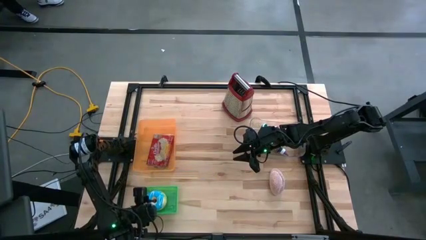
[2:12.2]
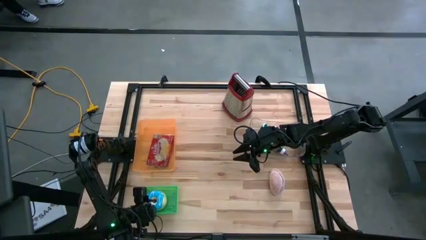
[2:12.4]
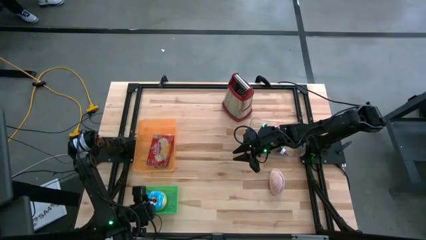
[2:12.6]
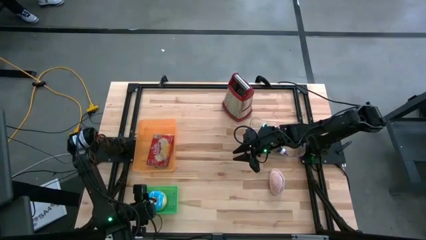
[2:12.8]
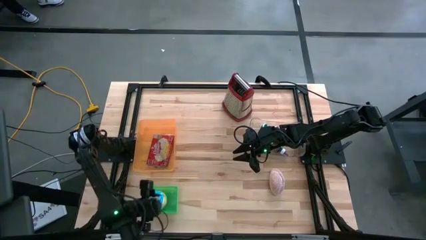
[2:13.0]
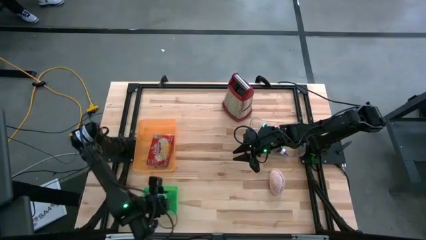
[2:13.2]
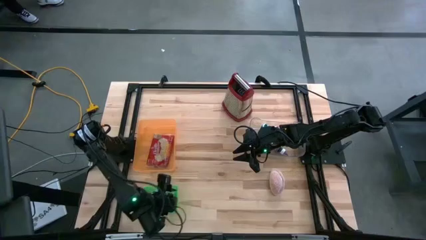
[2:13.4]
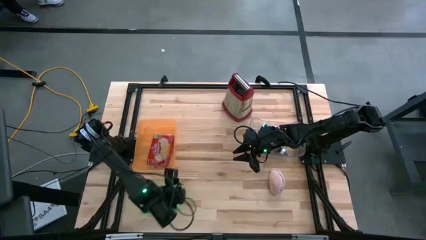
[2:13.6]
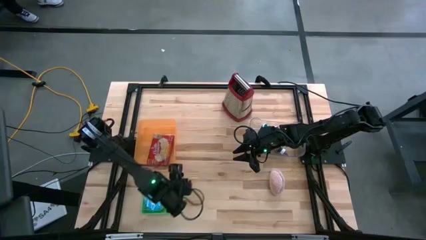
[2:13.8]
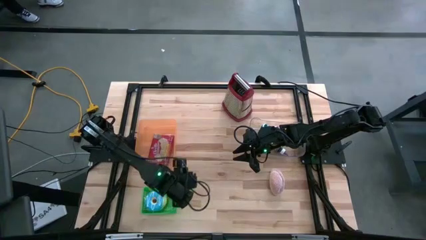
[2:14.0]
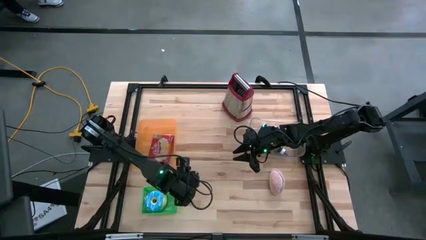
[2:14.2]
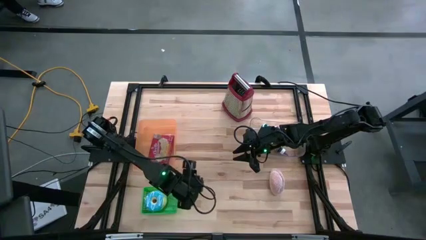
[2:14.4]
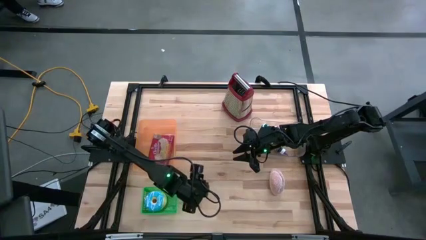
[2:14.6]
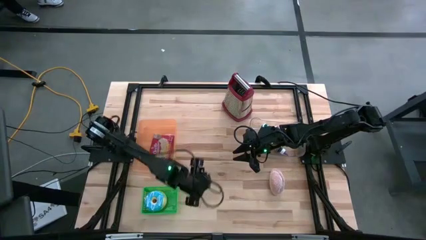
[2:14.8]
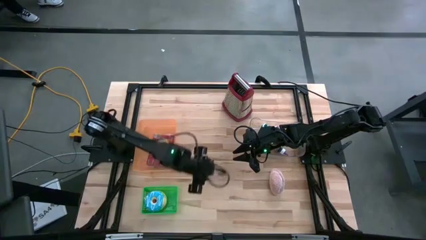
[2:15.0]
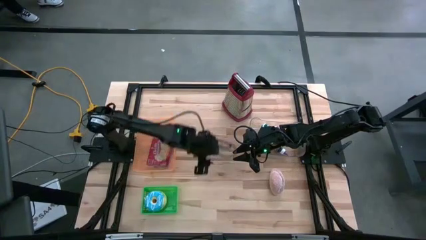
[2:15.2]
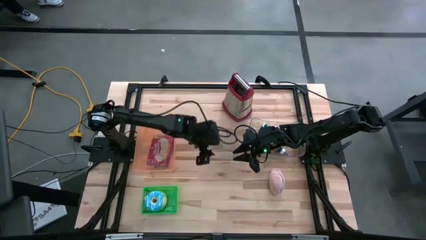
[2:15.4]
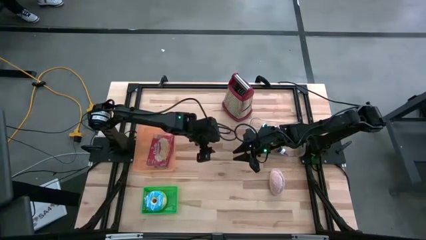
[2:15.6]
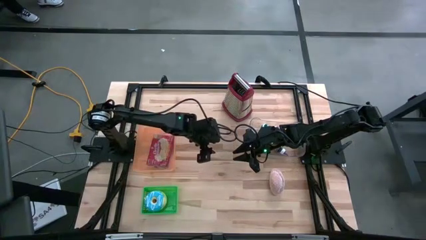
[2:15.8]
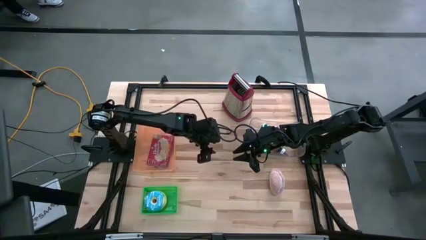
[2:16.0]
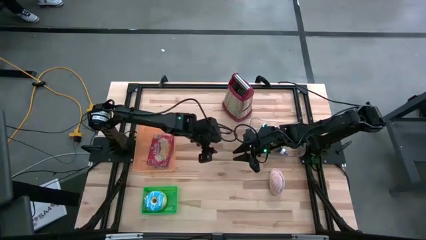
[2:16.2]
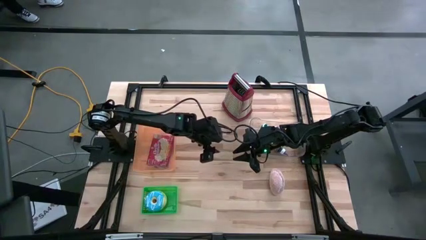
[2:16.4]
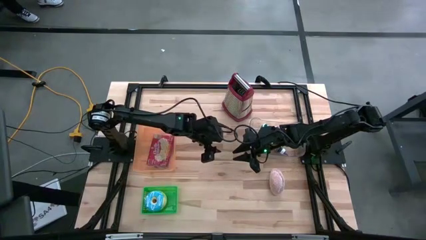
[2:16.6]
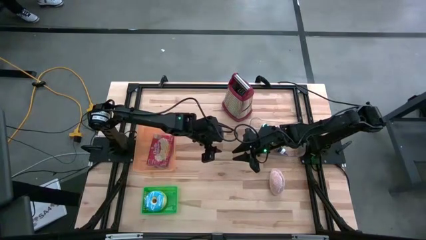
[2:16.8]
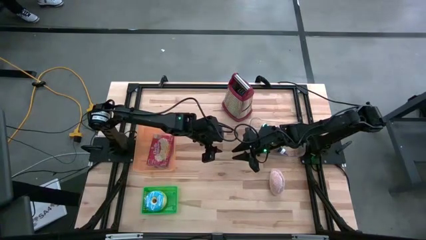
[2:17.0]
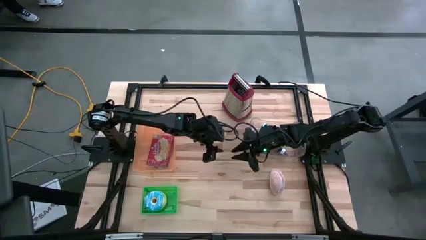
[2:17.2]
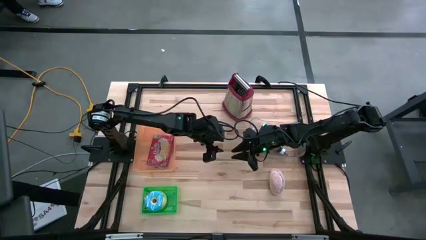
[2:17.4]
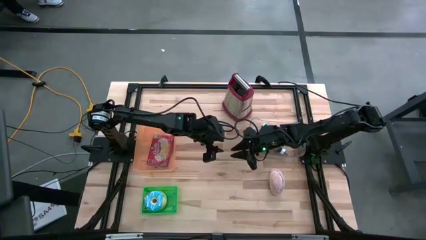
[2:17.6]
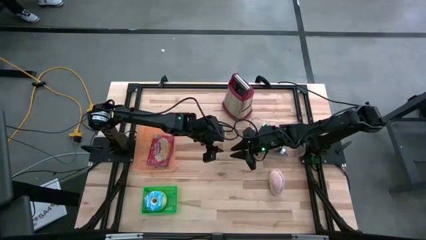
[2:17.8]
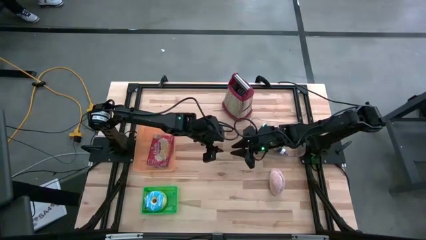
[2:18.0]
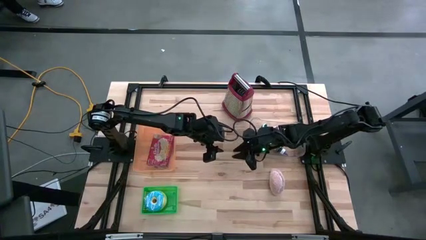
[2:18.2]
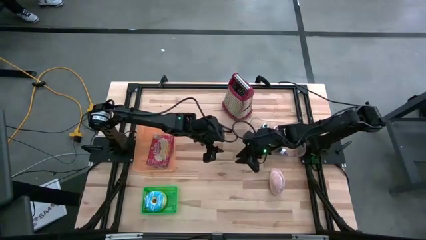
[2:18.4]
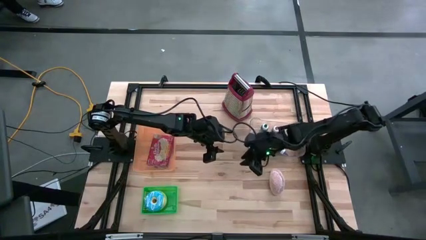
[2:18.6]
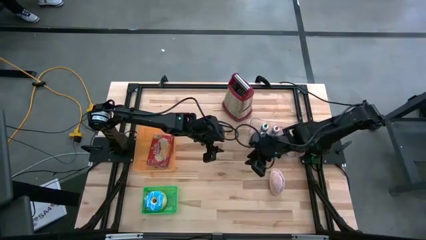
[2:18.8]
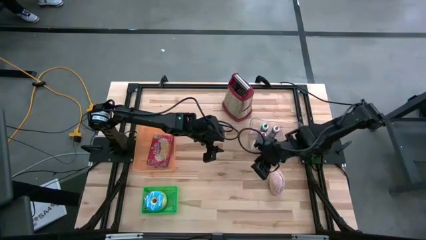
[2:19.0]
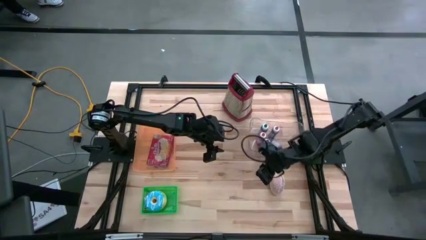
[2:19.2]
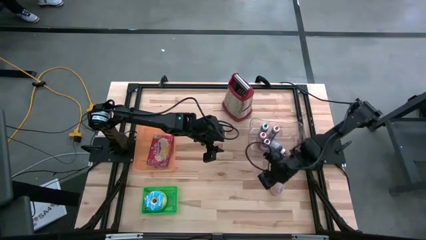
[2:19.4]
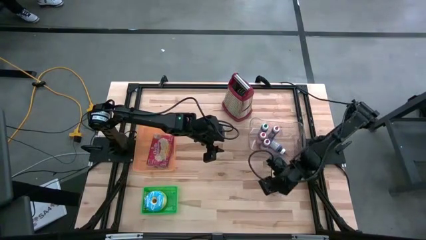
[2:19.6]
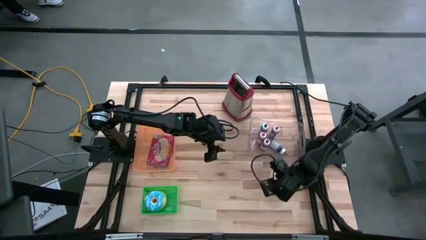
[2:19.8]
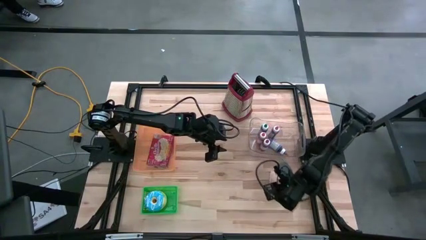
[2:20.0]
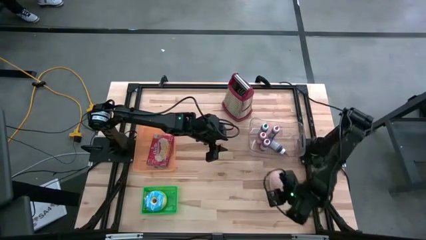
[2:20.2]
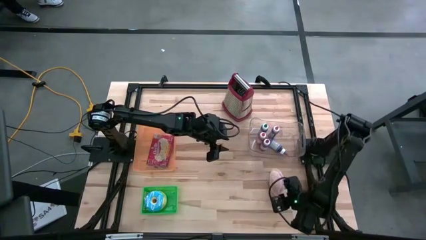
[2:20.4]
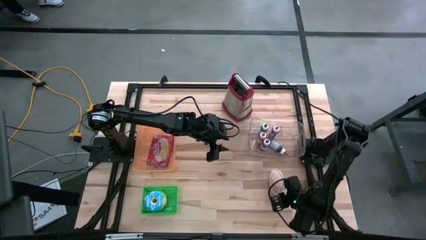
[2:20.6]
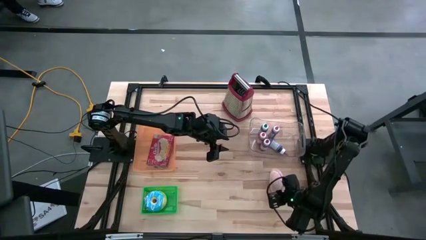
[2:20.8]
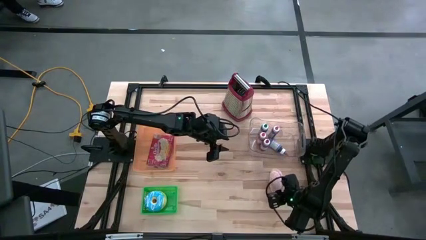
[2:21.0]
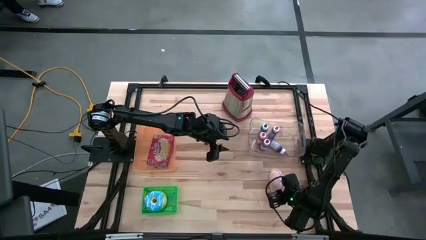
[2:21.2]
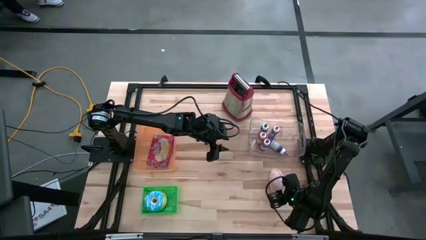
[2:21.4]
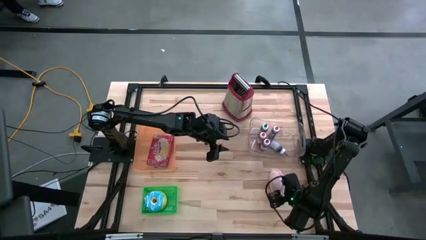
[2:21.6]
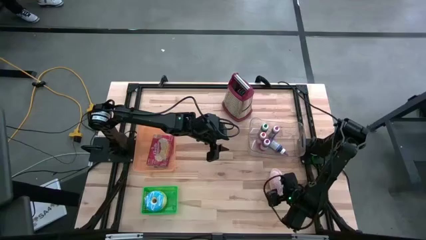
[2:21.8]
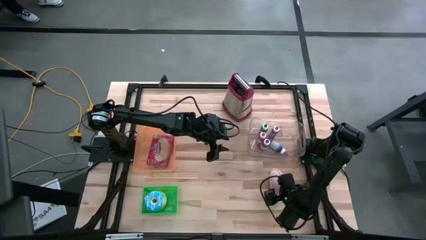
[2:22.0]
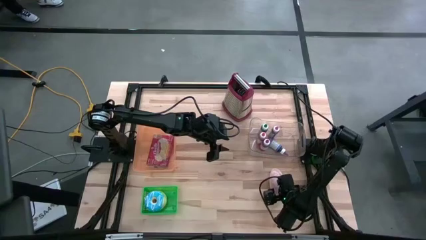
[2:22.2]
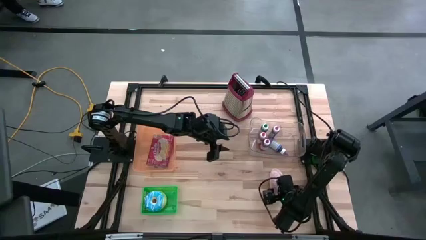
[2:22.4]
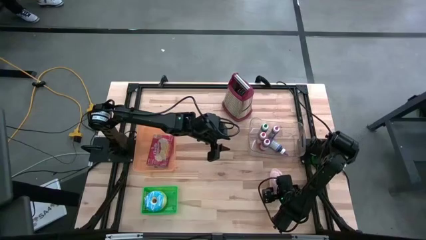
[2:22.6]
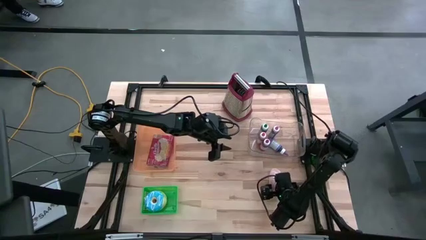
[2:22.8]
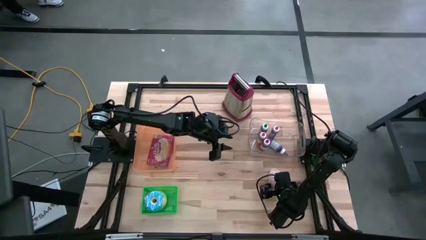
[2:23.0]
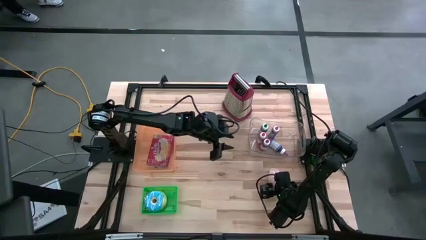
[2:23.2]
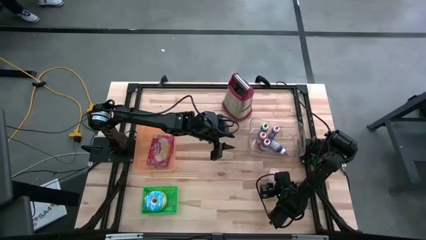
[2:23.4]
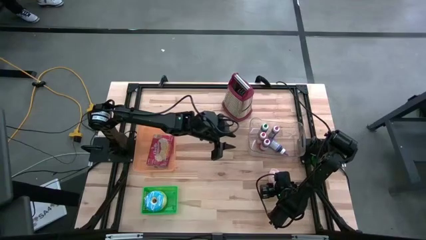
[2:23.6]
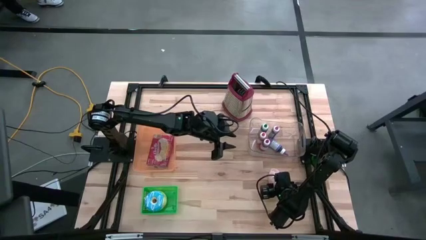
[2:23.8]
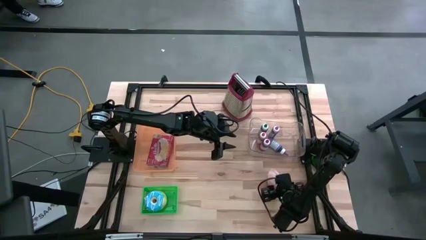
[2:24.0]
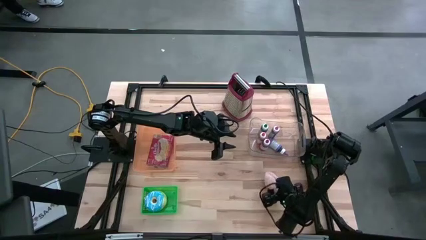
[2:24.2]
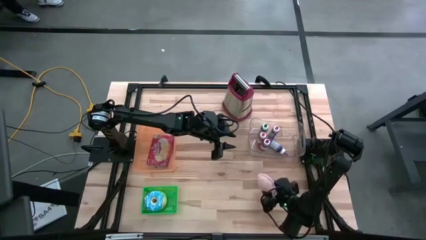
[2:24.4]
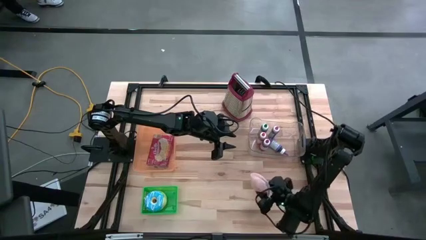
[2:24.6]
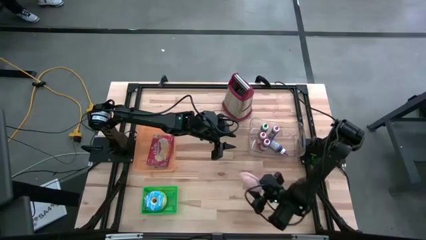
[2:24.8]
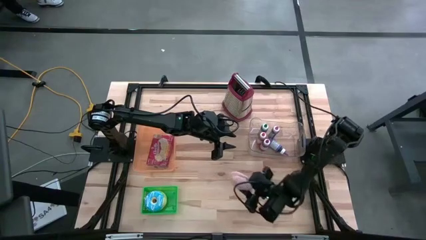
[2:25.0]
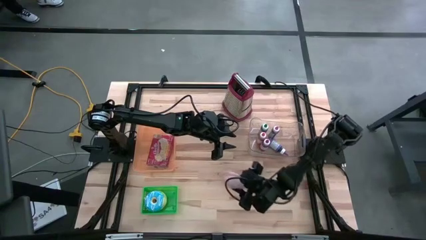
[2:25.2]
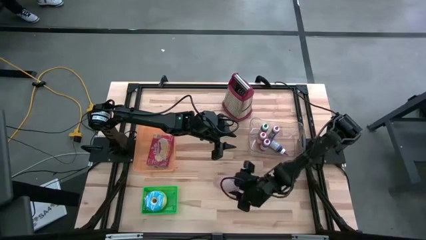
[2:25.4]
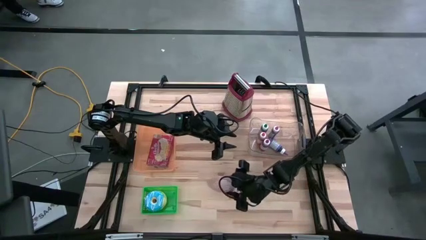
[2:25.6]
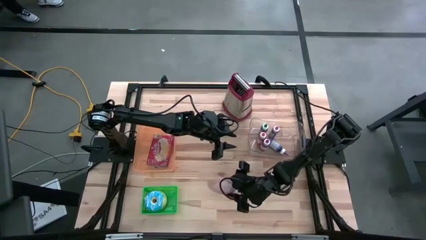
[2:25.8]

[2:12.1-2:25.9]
Put the brown donut into the green basket
